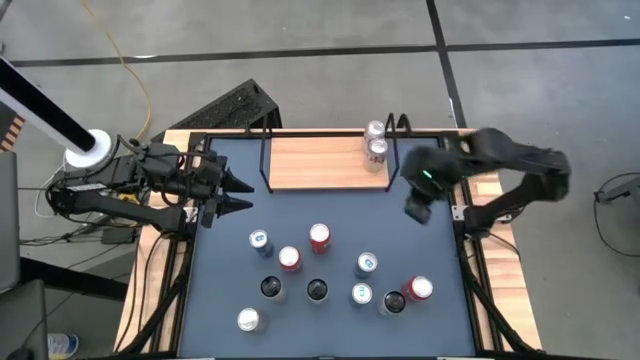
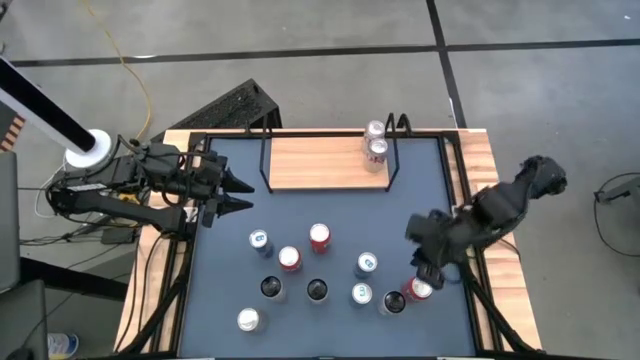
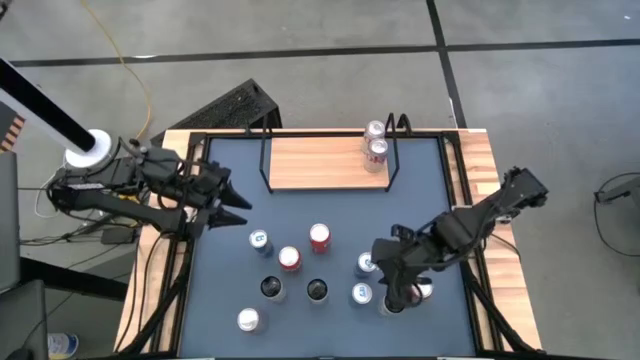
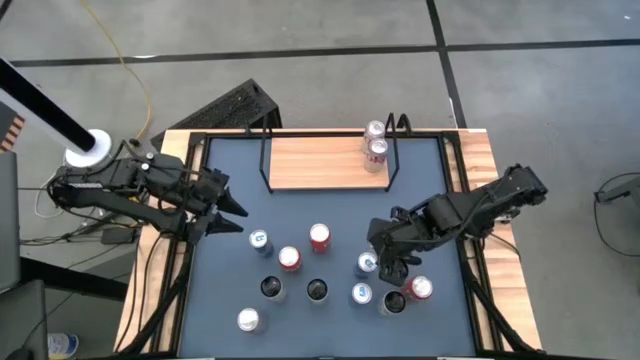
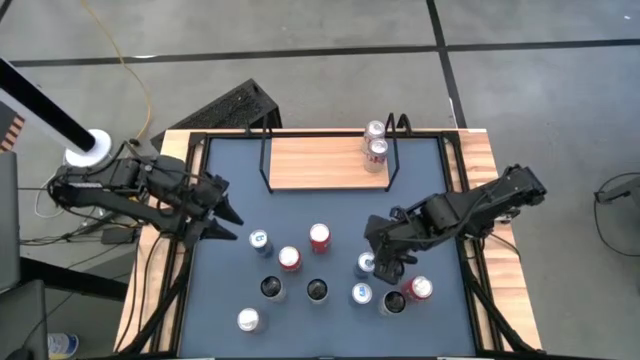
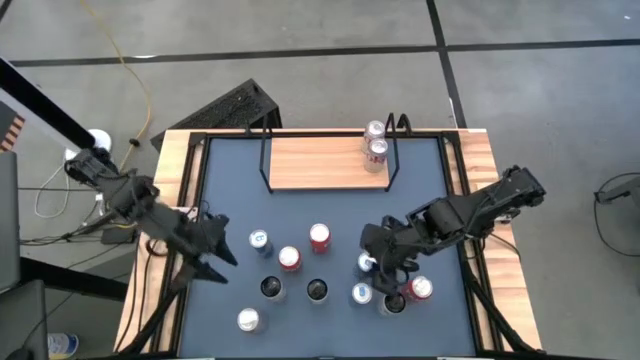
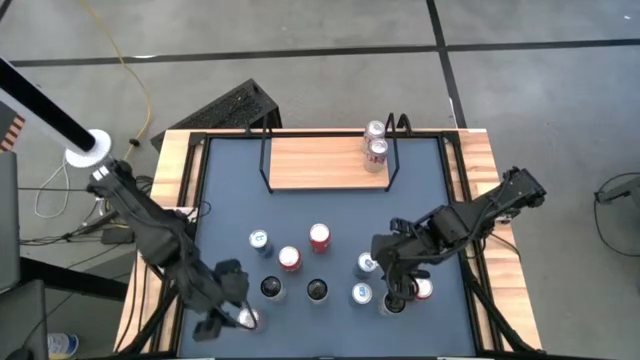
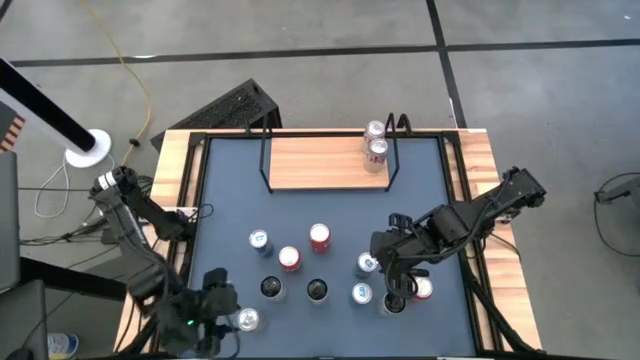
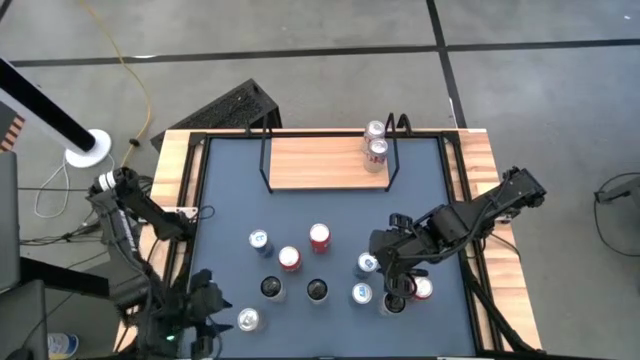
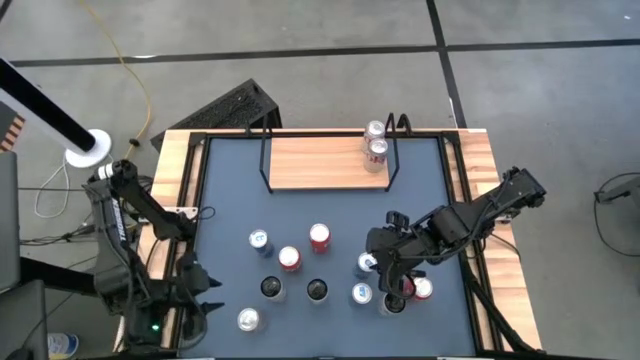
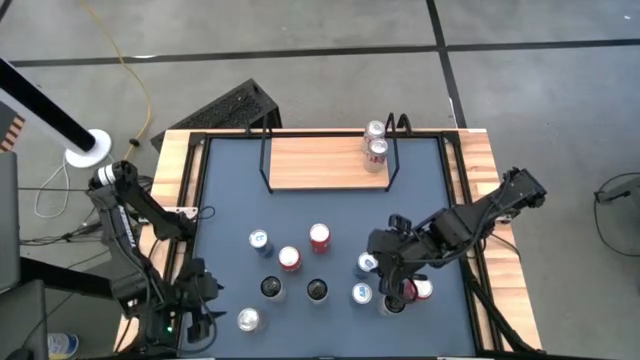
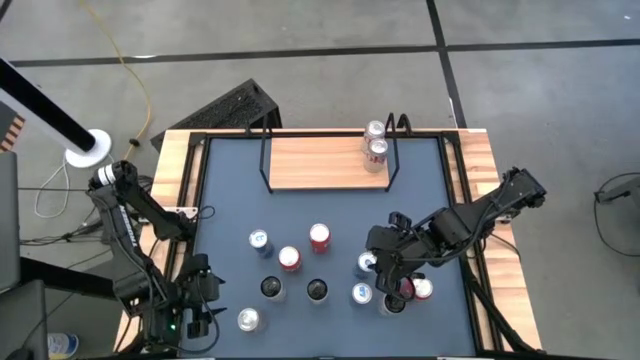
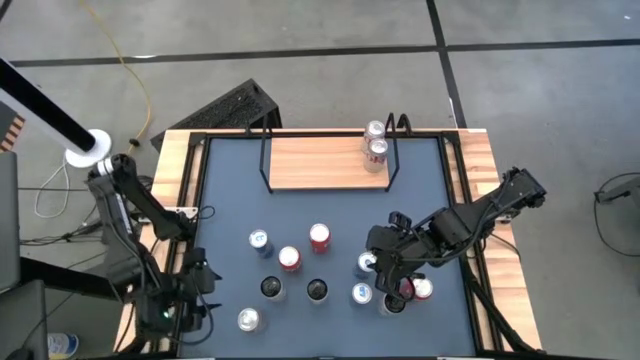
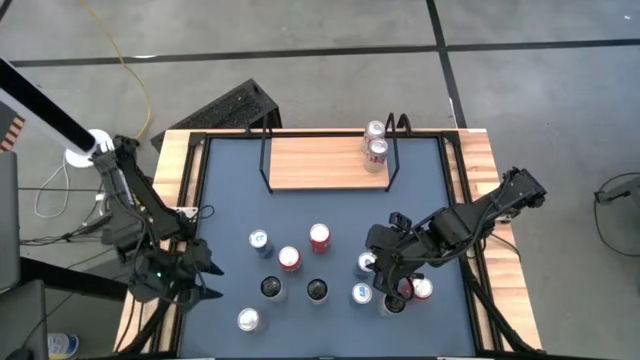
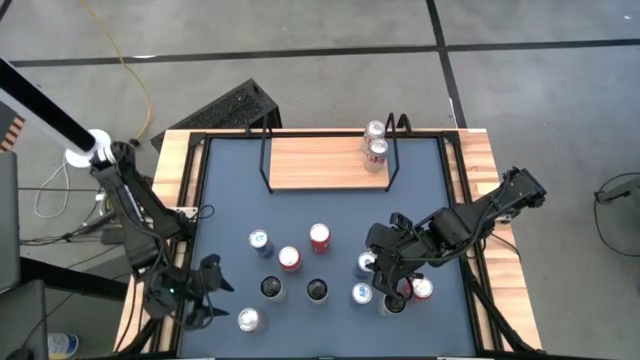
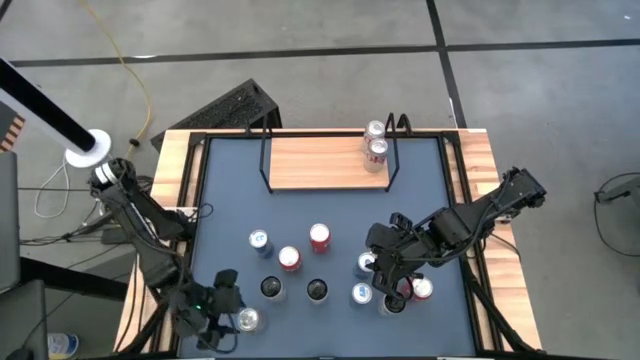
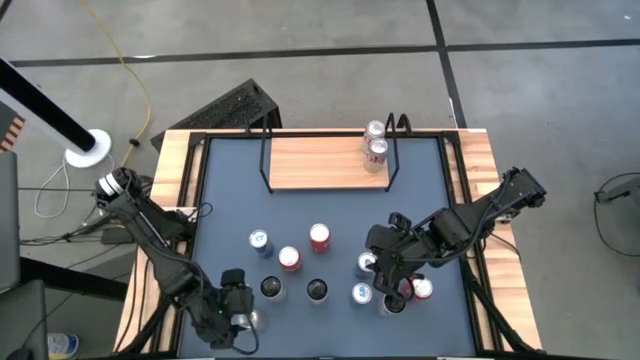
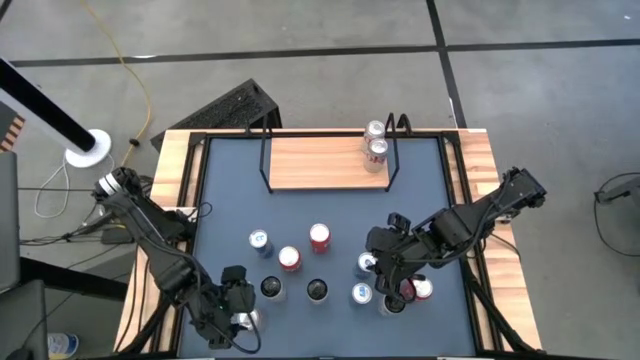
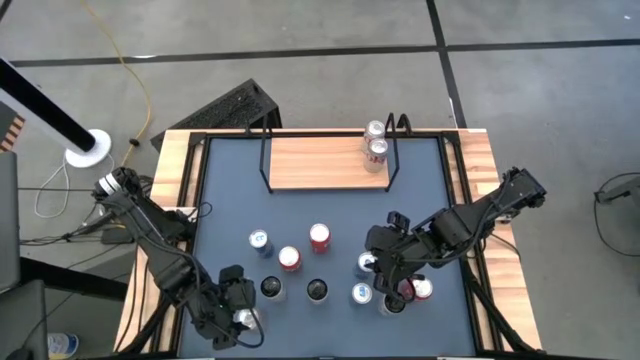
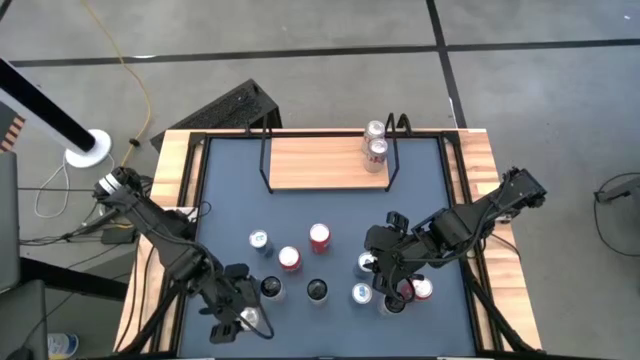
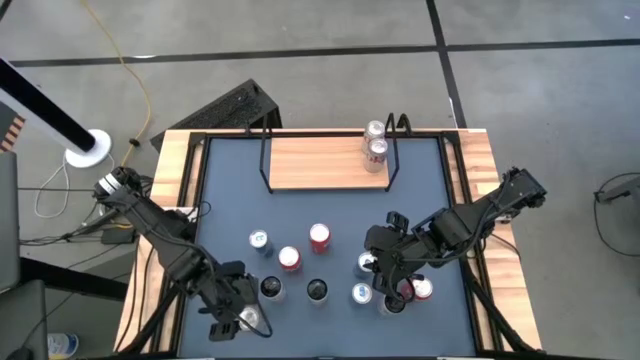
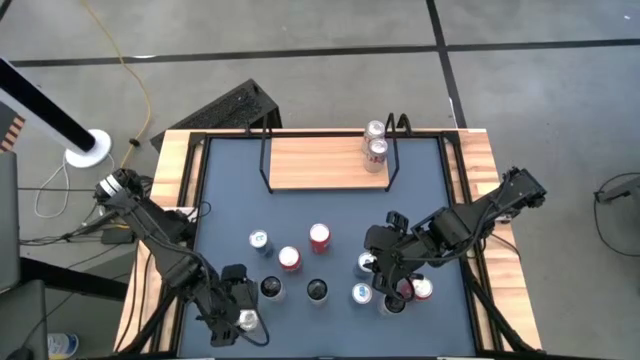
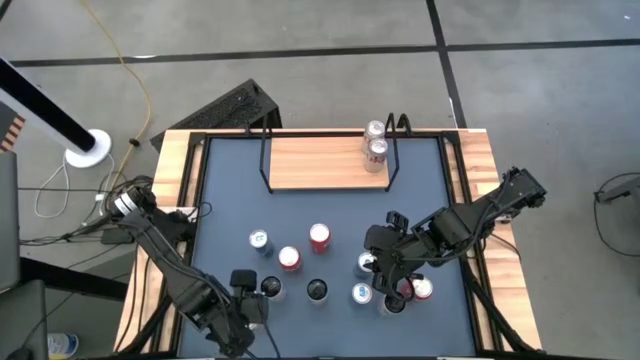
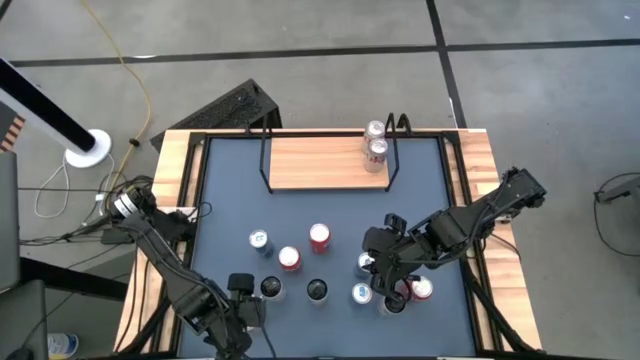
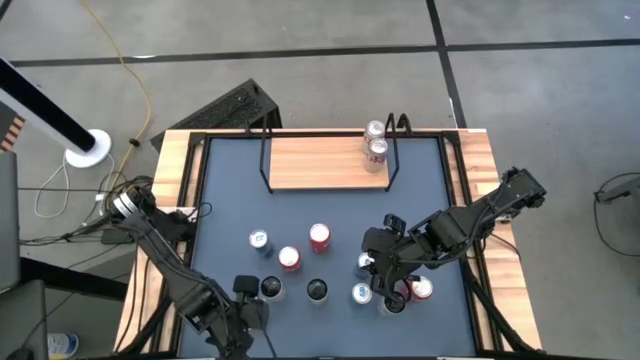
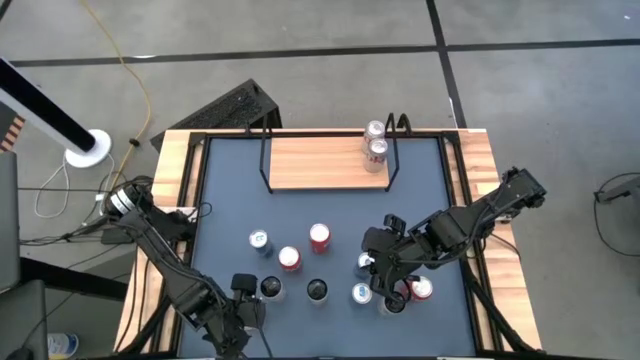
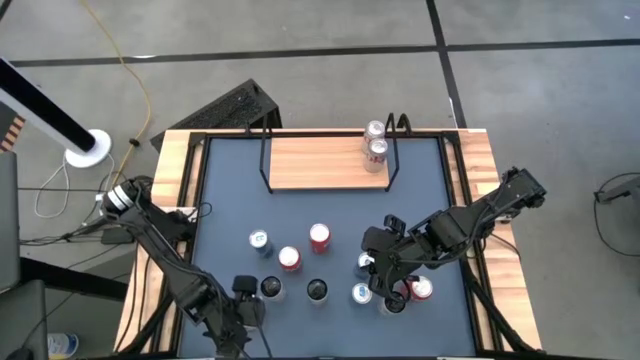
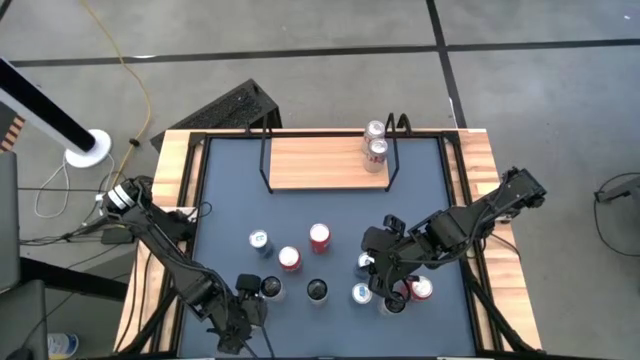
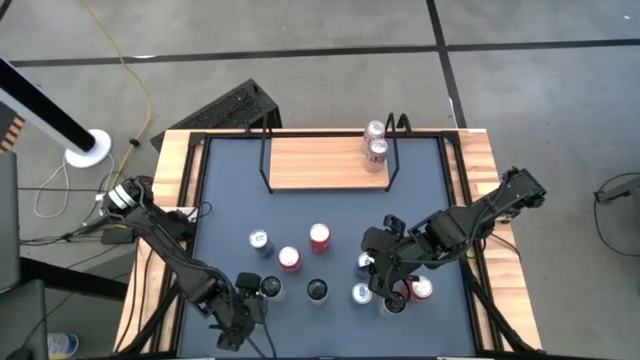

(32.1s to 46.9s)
Task: Place canned beverage on shelf
Put the silver soda can on the shelf aligned with the other silver soda cans

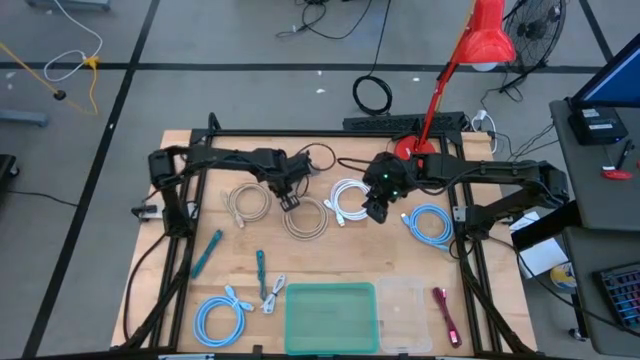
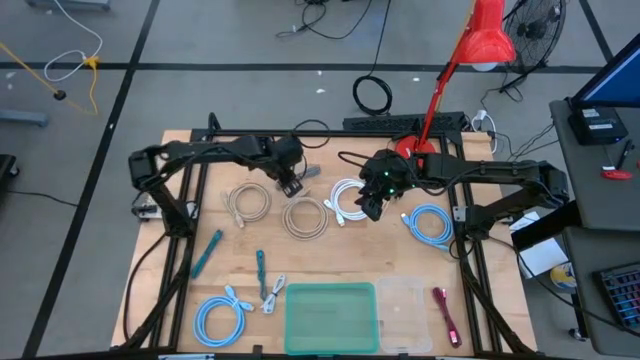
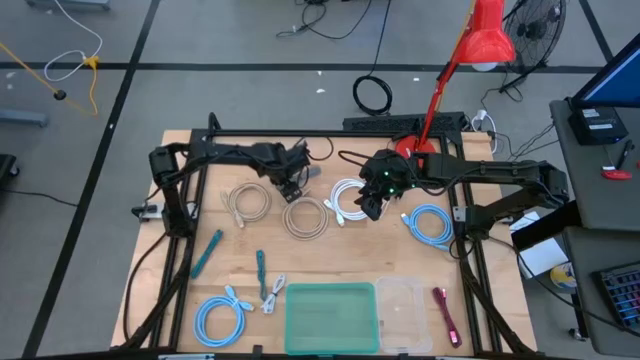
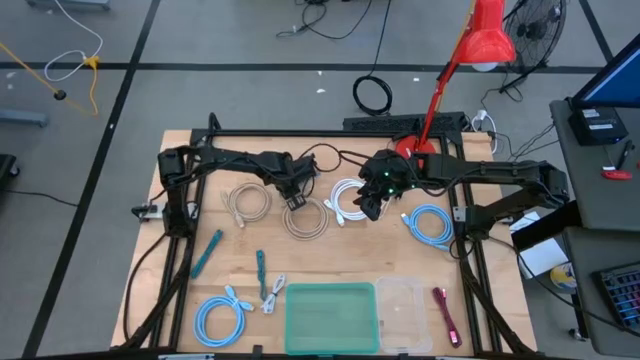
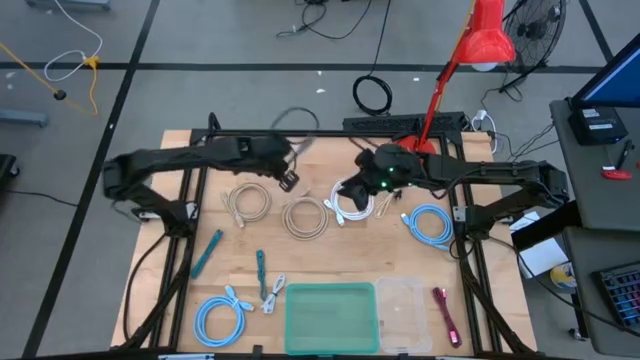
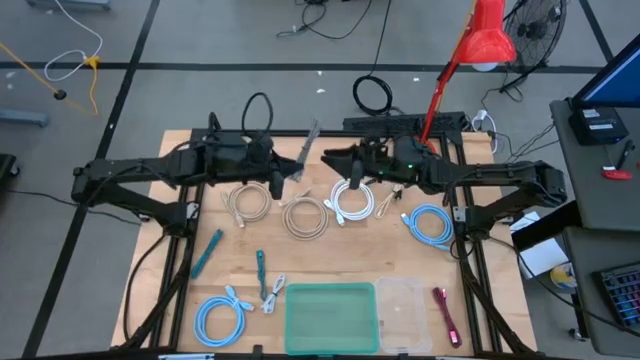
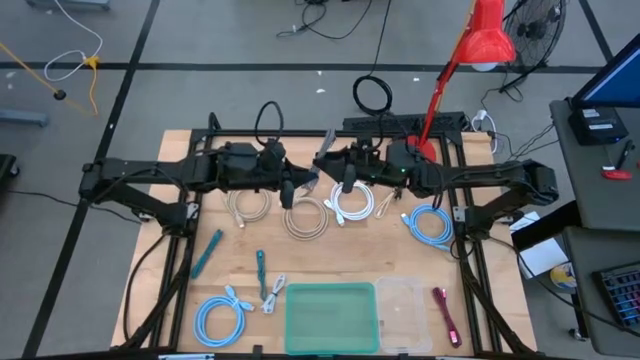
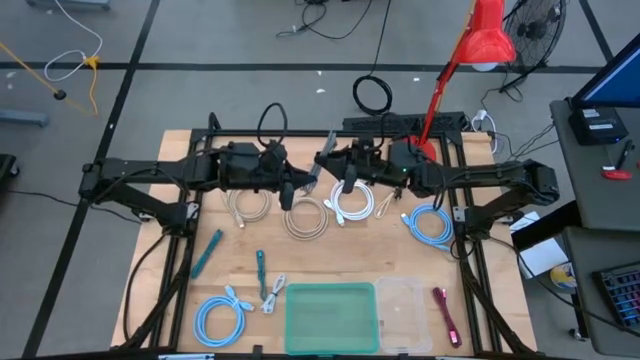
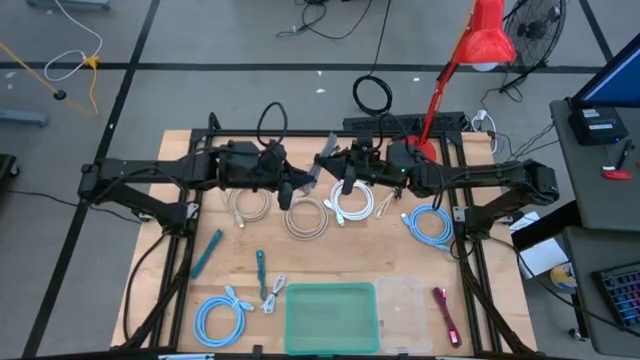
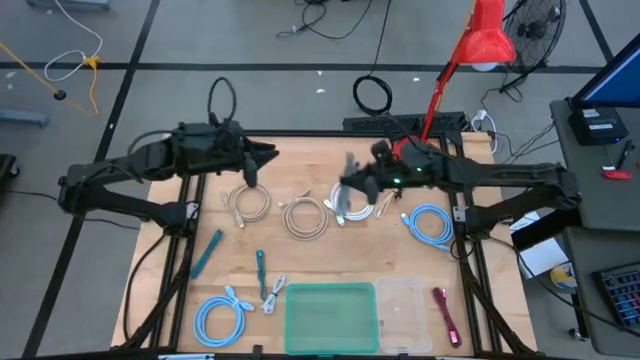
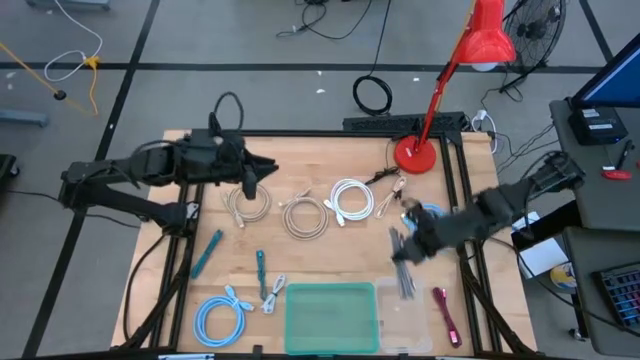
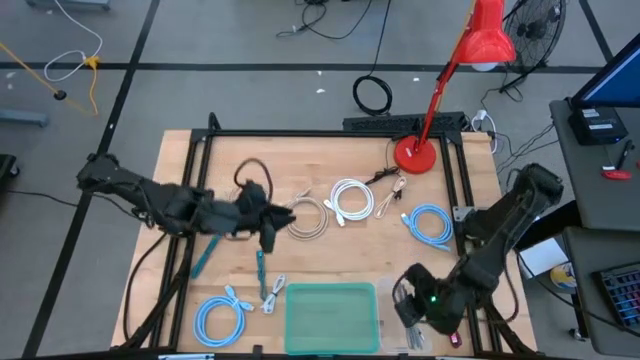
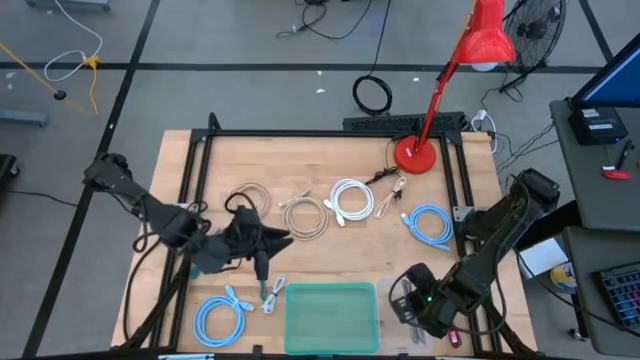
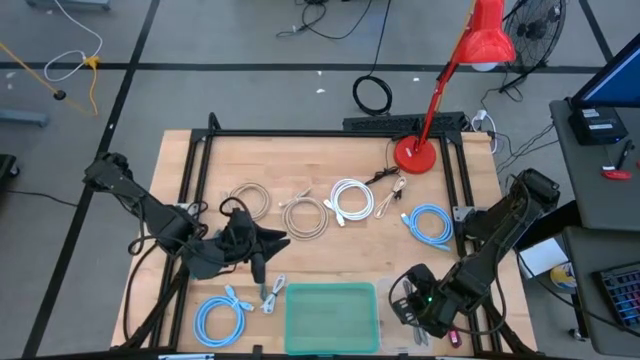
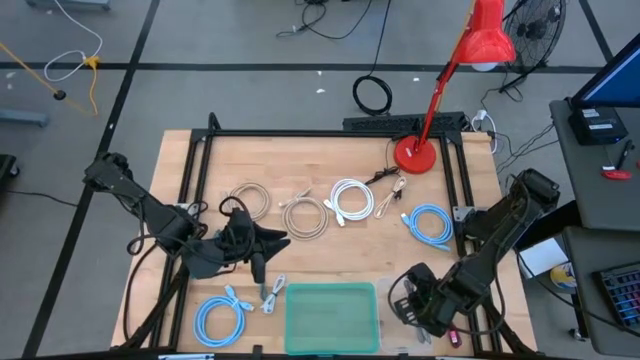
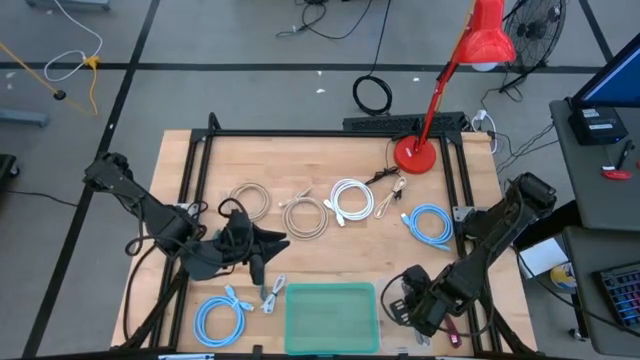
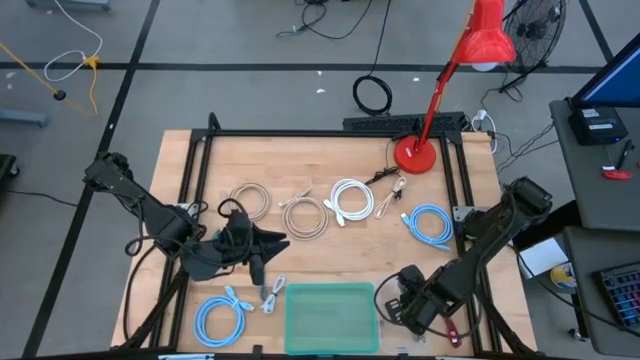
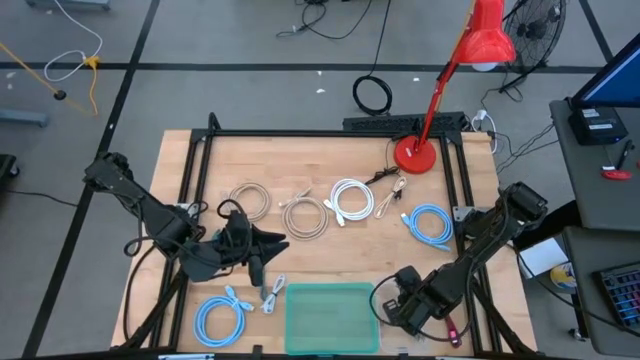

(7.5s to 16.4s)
Task: Pick & Place USB Port
Put the black charger cable into the white transparent bin
